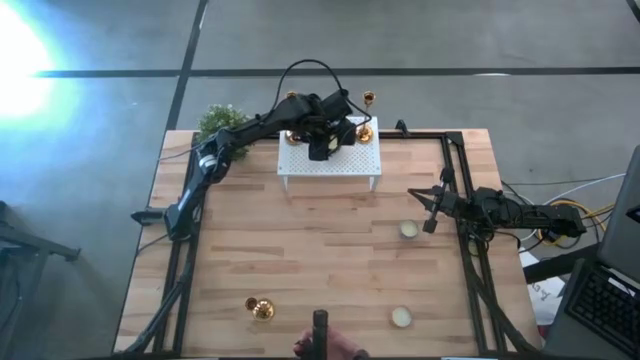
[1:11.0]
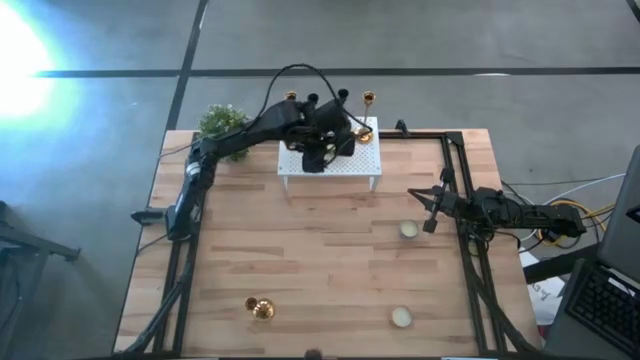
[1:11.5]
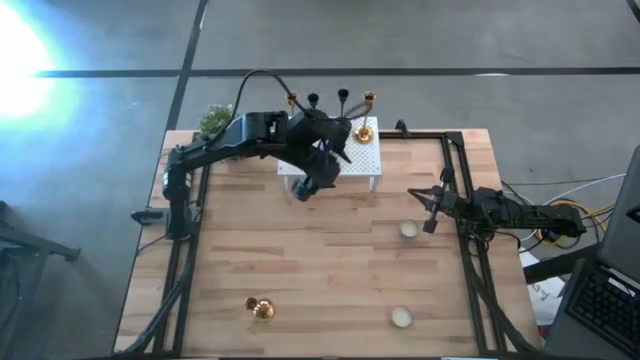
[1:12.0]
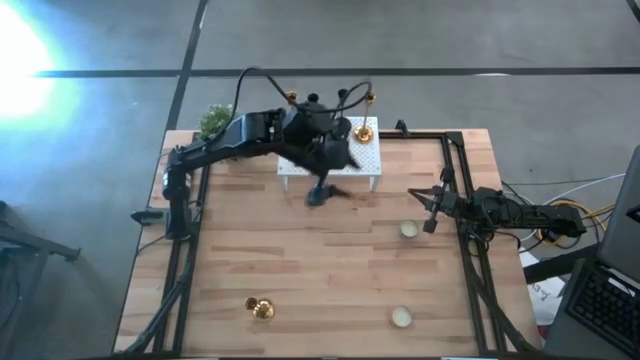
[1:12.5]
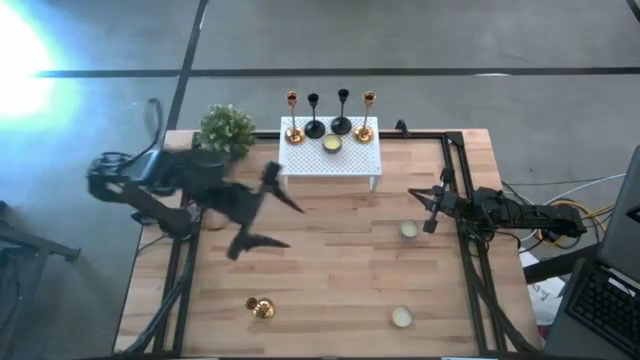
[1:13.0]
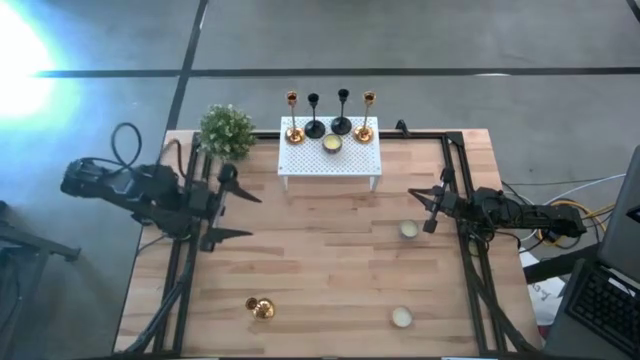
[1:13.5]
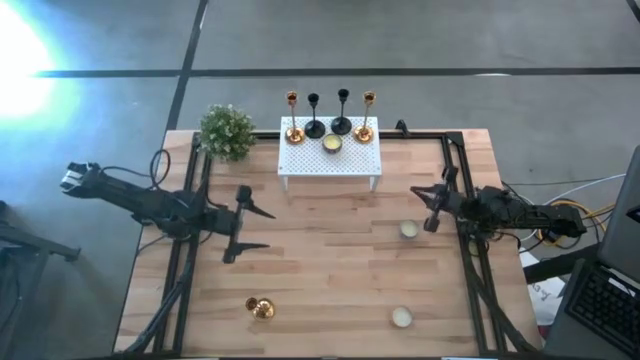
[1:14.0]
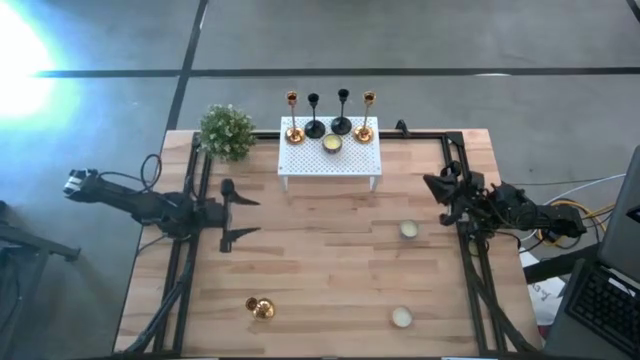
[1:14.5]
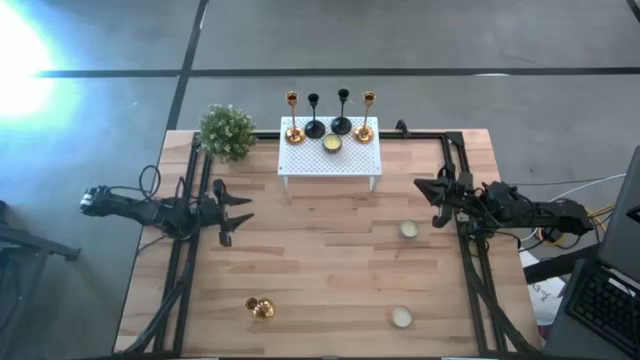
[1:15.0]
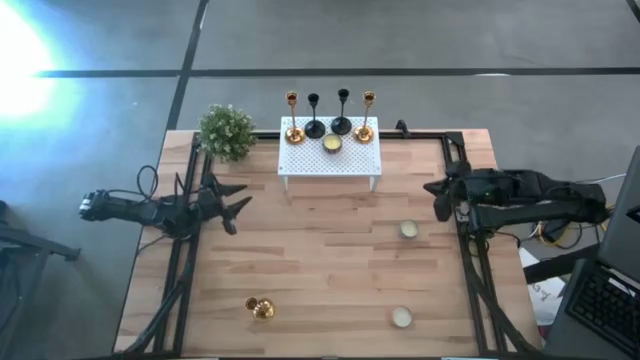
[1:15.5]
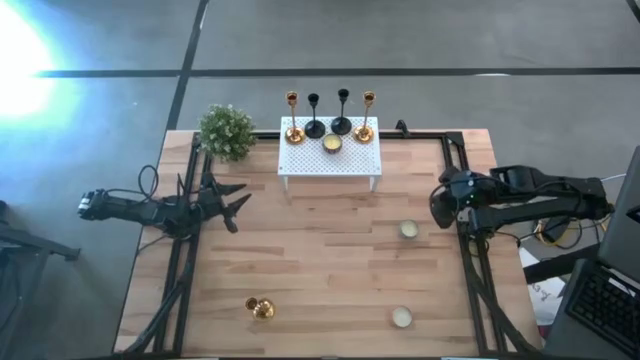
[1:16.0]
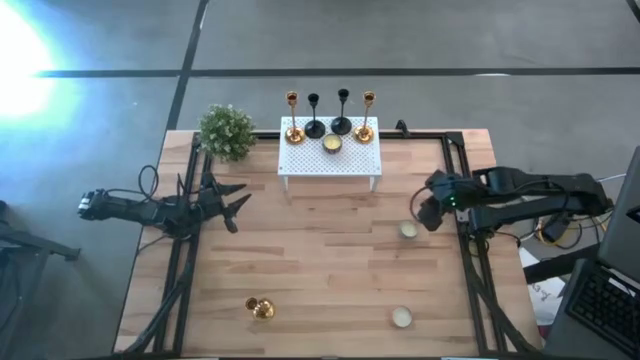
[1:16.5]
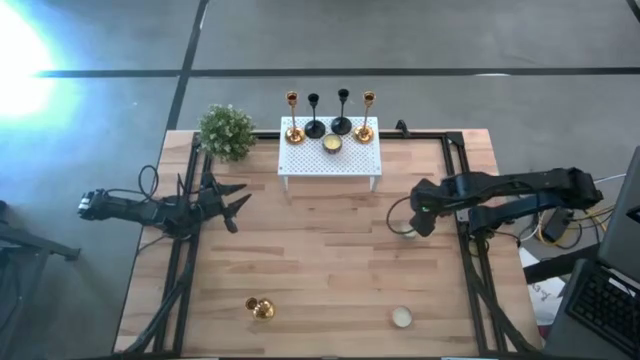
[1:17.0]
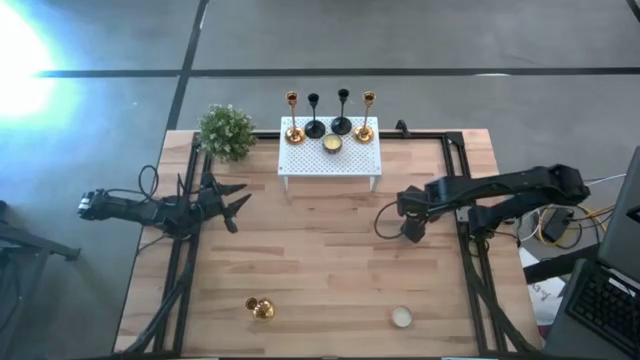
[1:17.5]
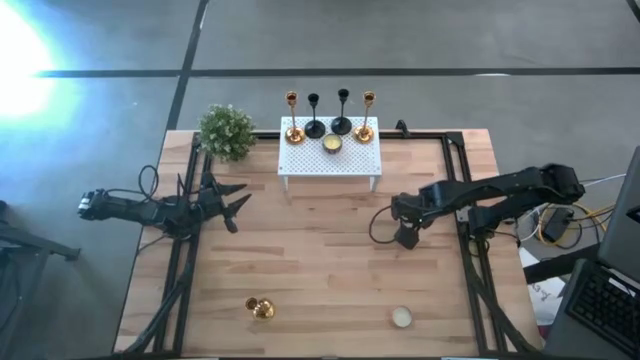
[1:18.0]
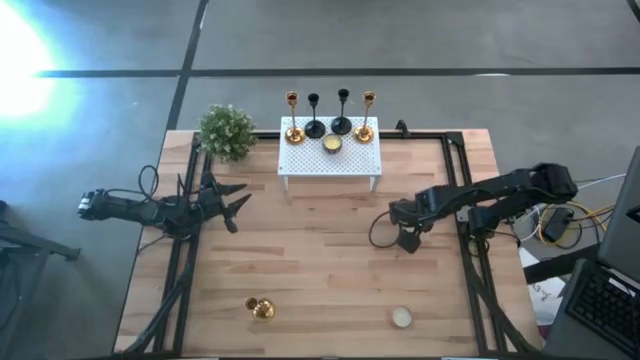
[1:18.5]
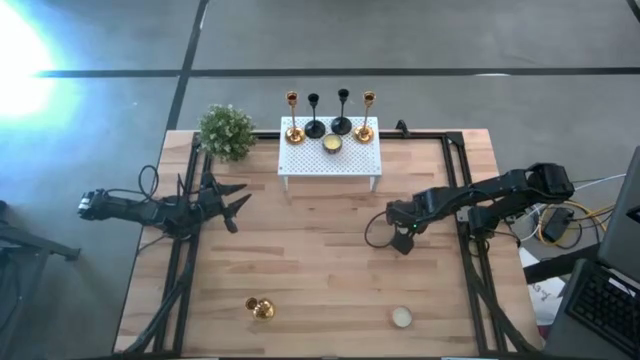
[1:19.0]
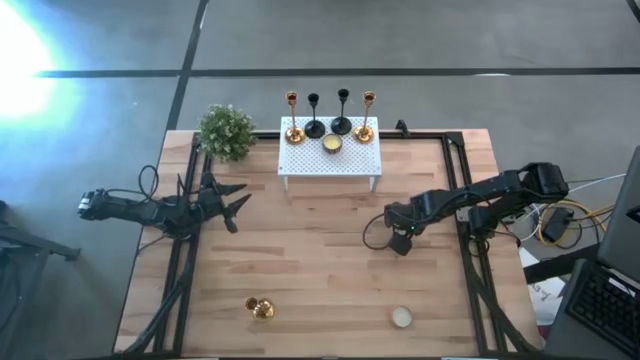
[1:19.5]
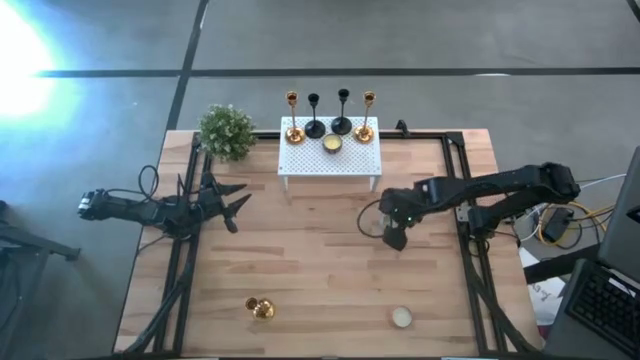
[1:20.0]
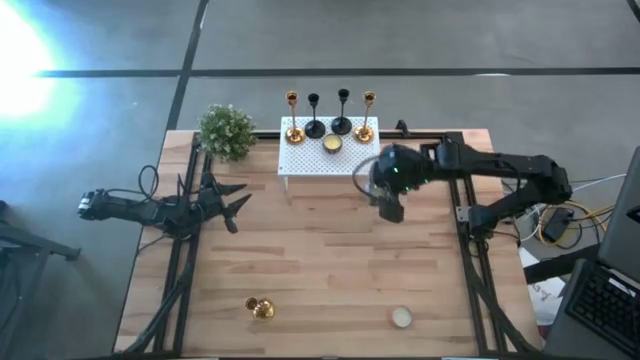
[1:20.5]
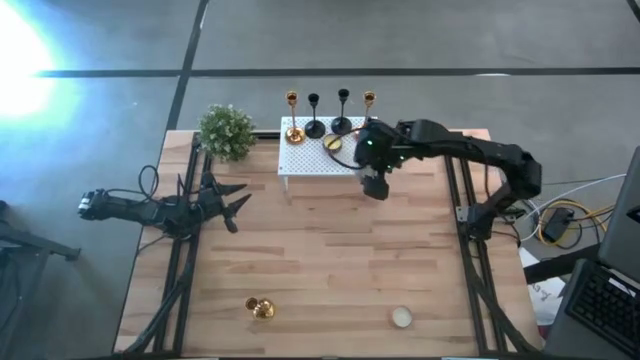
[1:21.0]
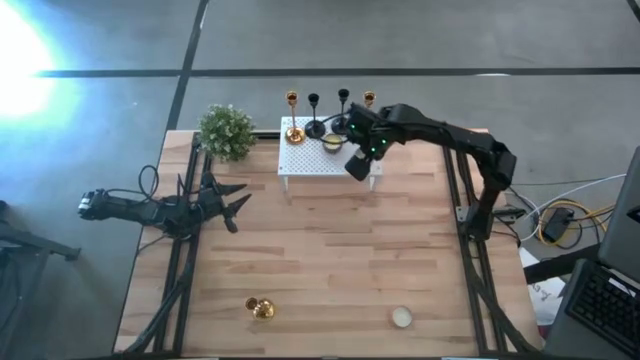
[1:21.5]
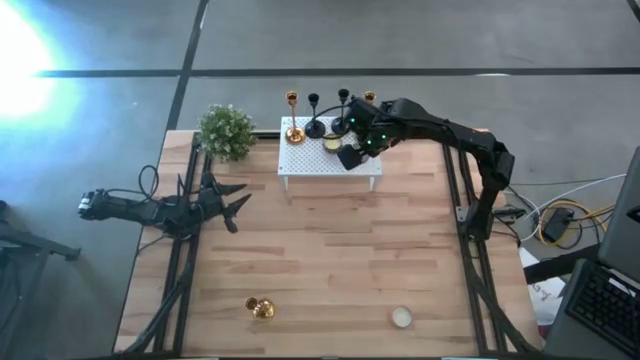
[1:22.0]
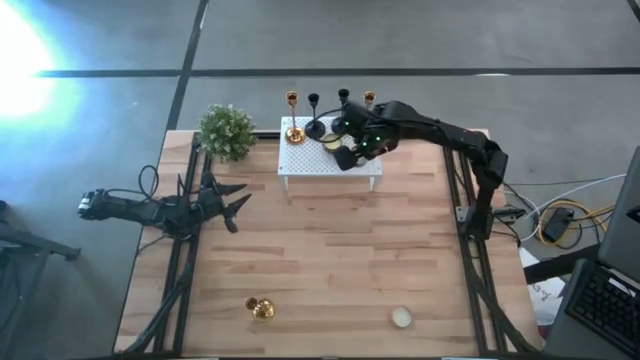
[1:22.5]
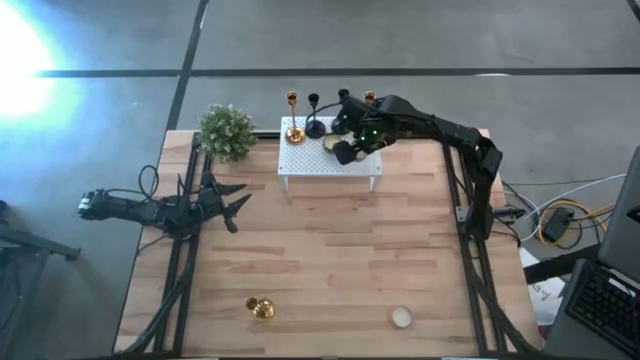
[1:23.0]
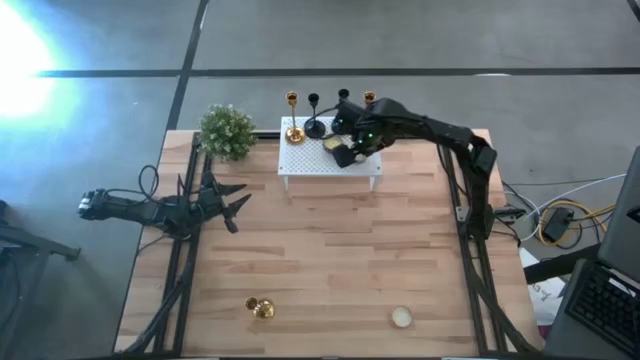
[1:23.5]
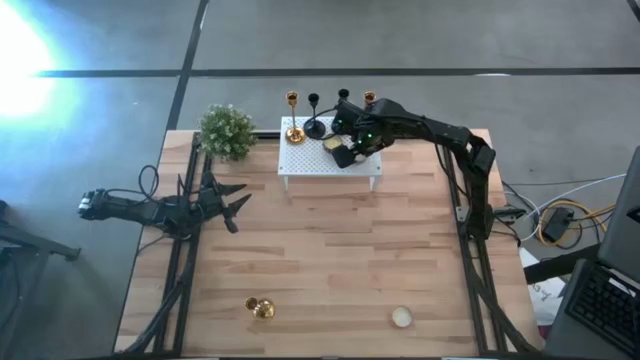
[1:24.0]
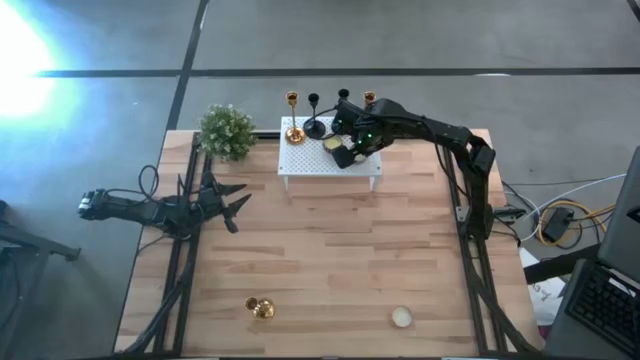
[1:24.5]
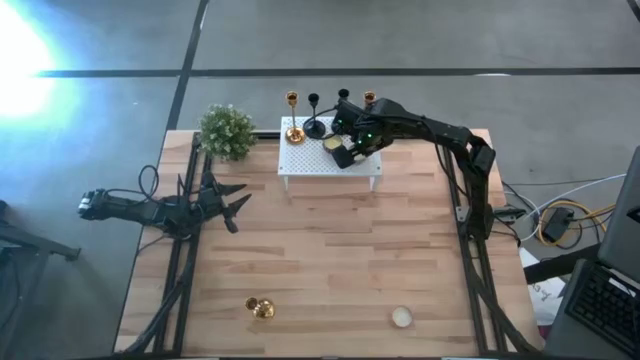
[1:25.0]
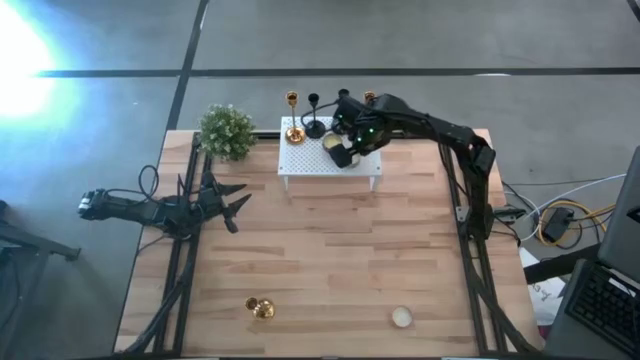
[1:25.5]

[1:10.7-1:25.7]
Task: Pick & Place candle stick holders
Put the blue scented candle on the shelf

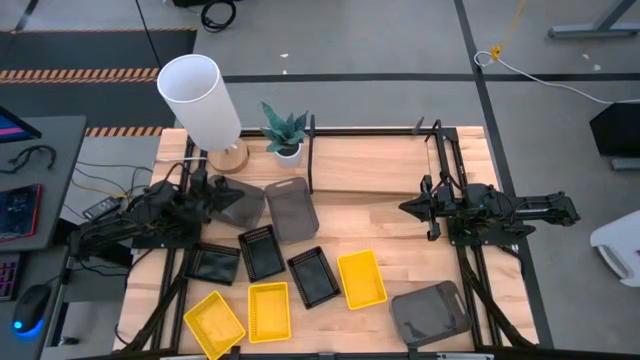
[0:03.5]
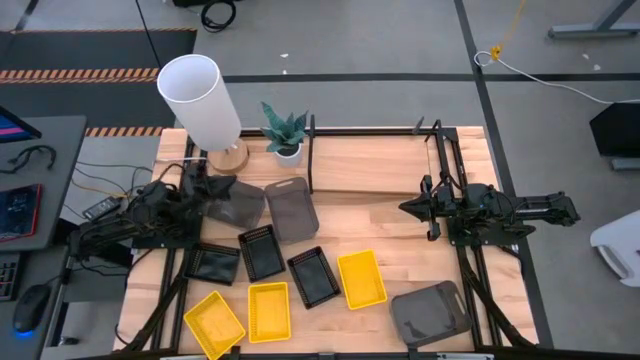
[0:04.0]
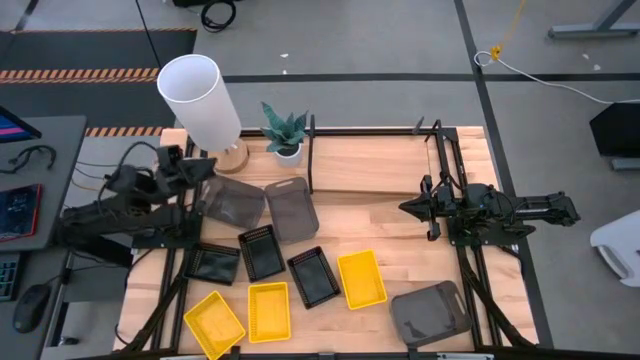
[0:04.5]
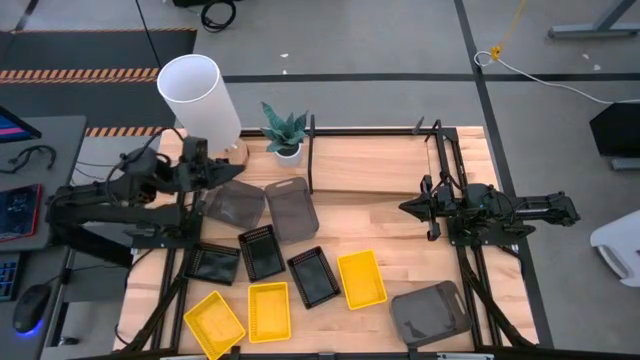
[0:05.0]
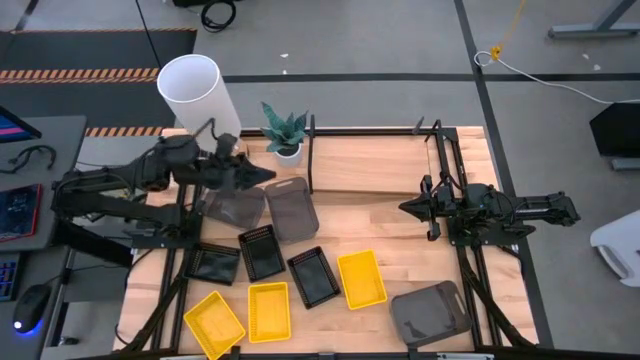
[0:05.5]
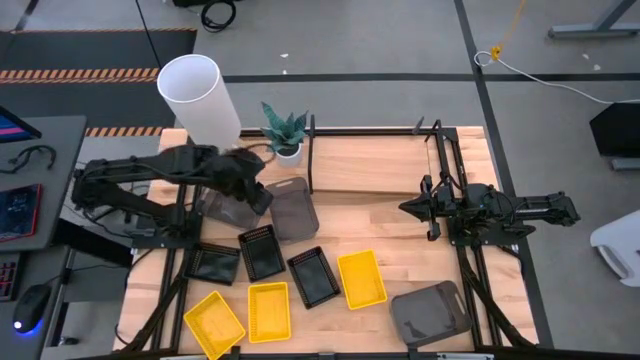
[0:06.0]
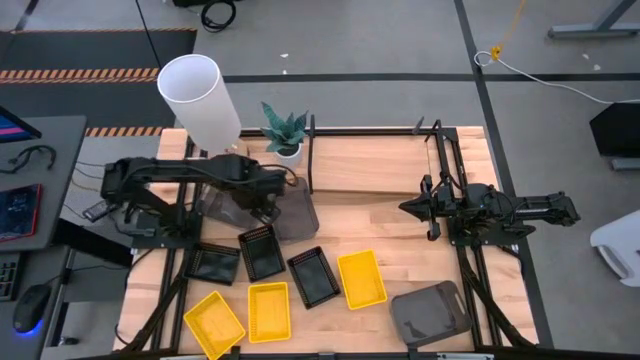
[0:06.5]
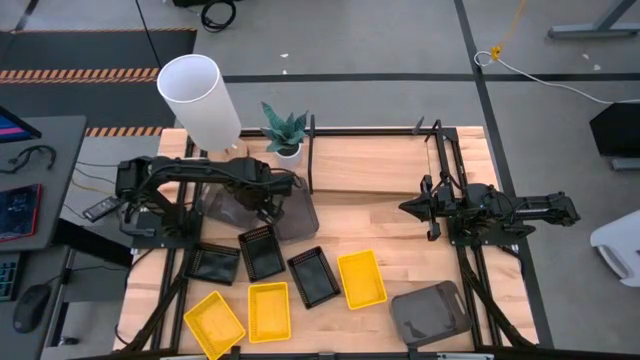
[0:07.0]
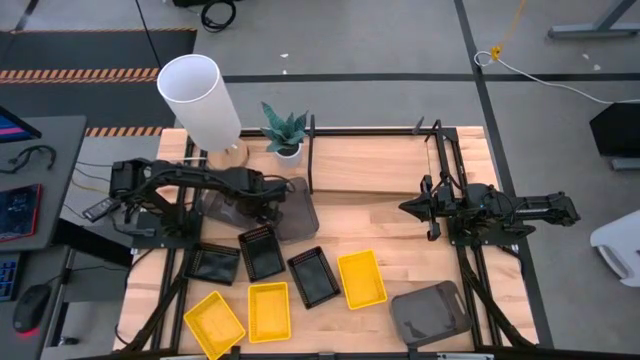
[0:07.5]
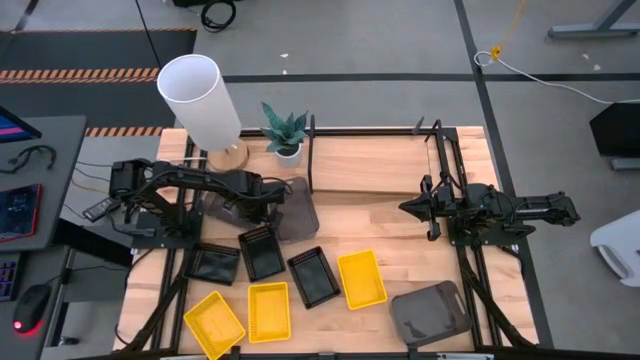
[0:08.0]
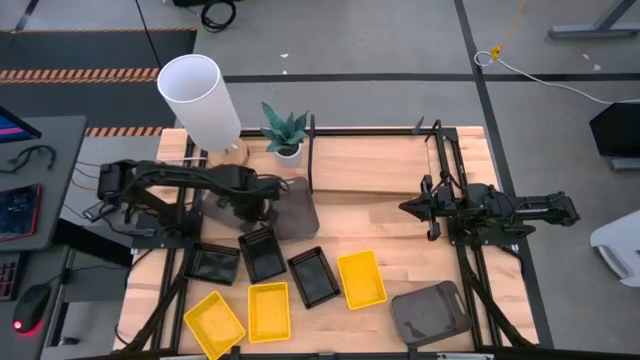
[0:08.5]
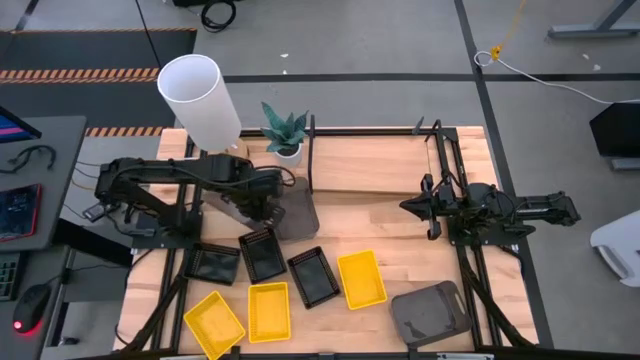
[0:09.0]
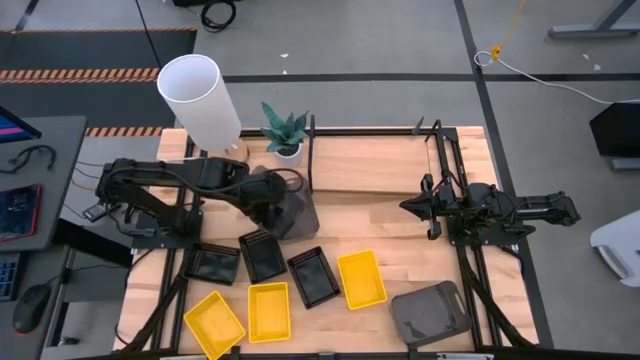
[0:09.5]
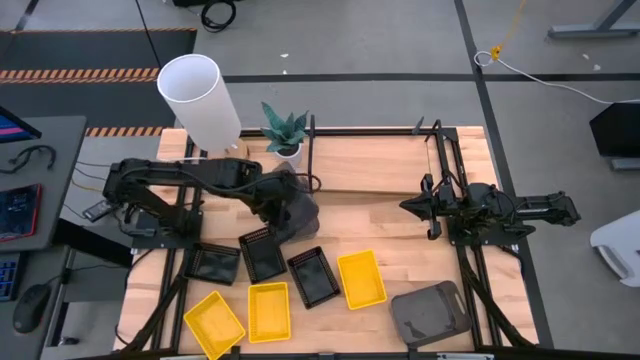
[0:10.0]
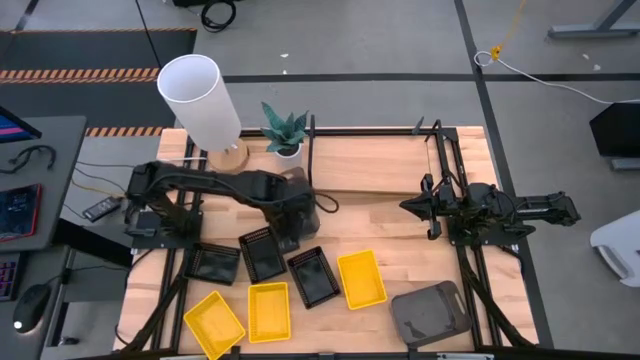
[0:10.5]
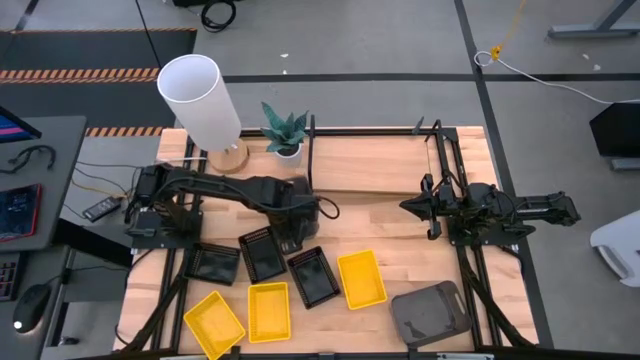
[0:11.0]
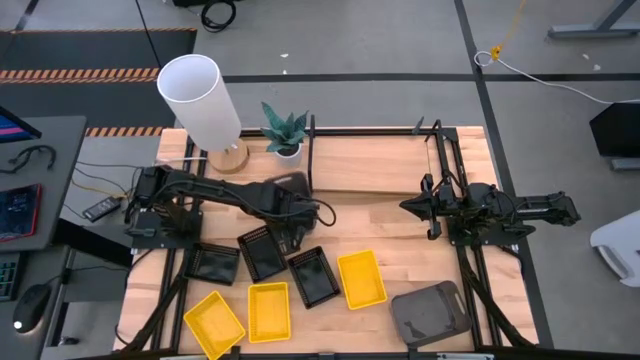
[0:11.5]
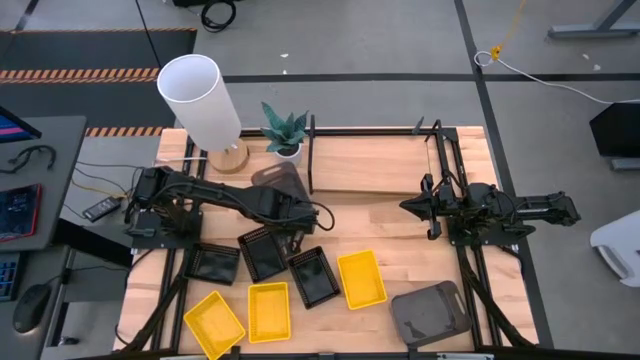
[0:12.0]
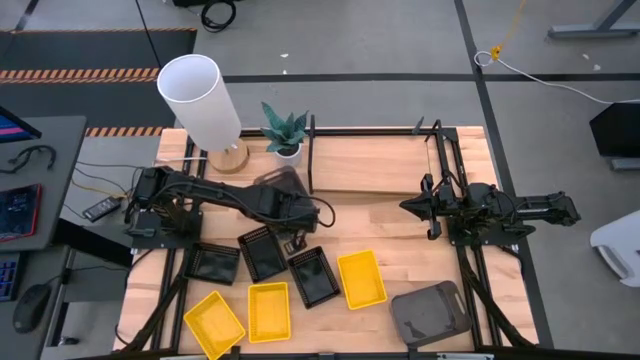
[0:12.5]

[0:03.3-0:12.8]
Task: Stack baskets on shelf by color
Stack the left transparent black bin into the top middle transparent black bin
